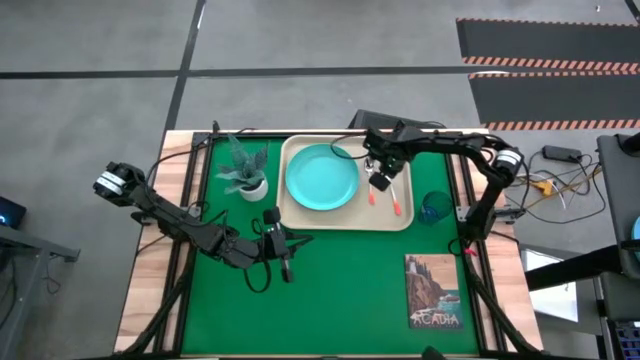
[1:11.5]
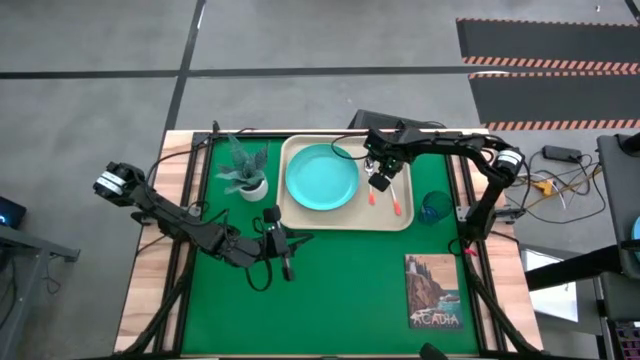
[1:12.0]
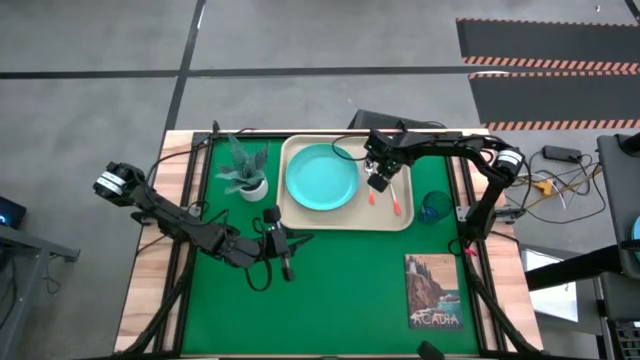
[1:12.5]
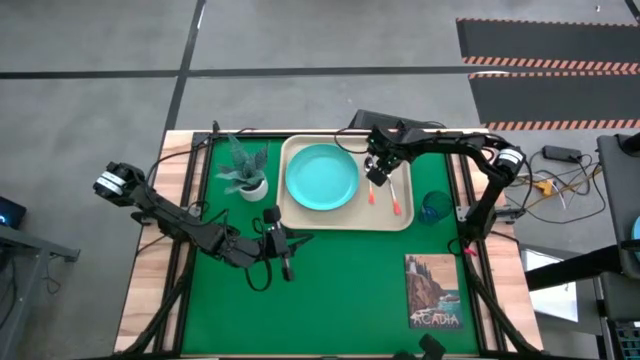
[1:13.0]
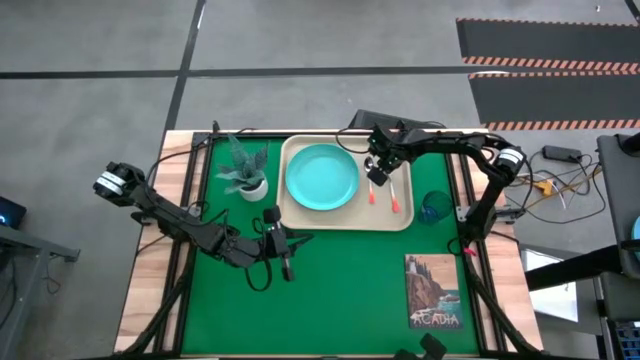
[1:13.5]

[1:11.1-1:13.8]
Task: Pick and place plate/cup/fork/spoon on tray
Adjust the orange fork on the light white tray

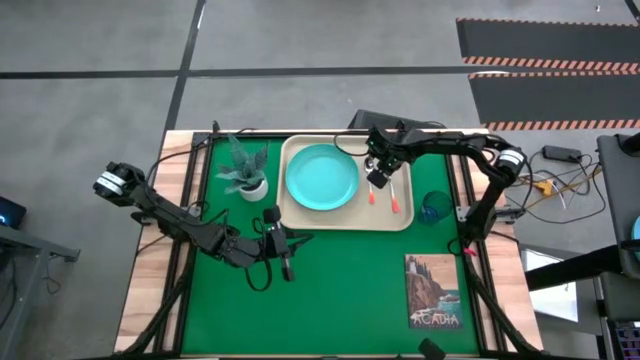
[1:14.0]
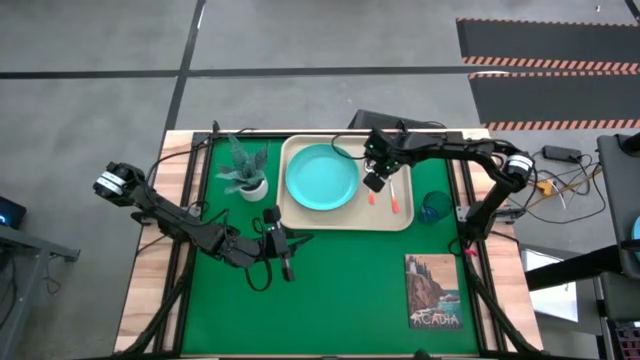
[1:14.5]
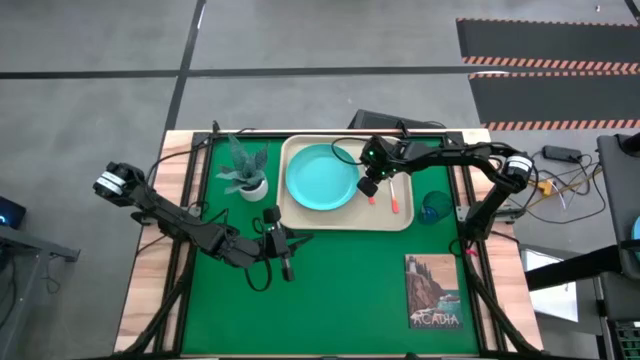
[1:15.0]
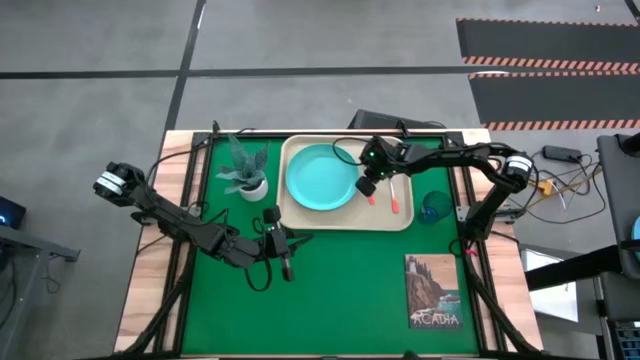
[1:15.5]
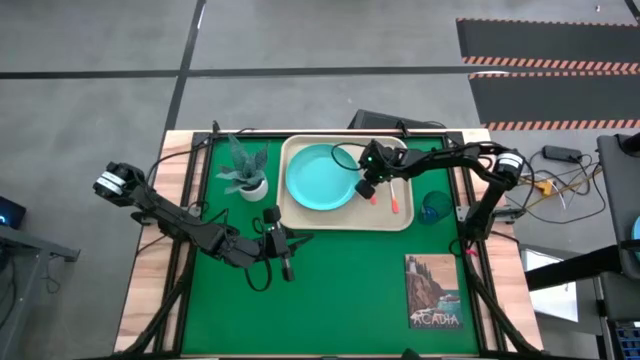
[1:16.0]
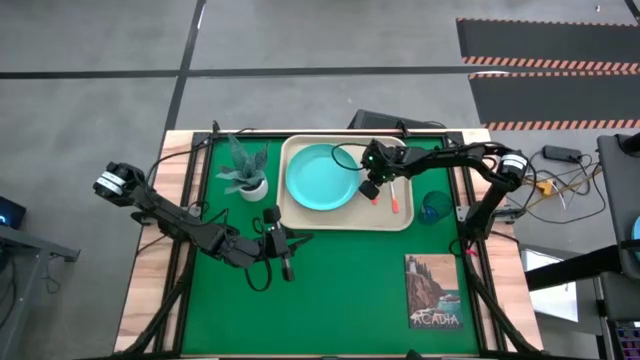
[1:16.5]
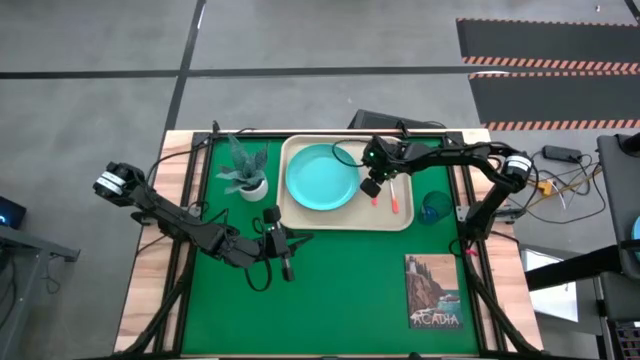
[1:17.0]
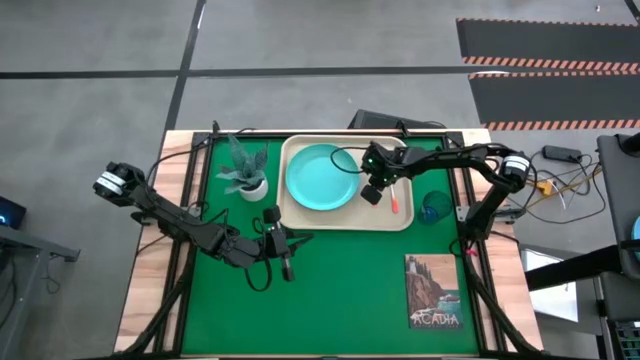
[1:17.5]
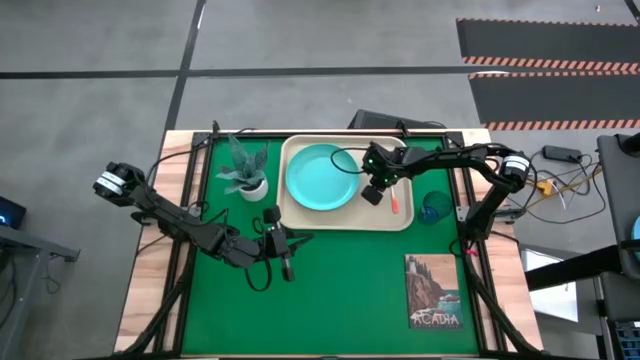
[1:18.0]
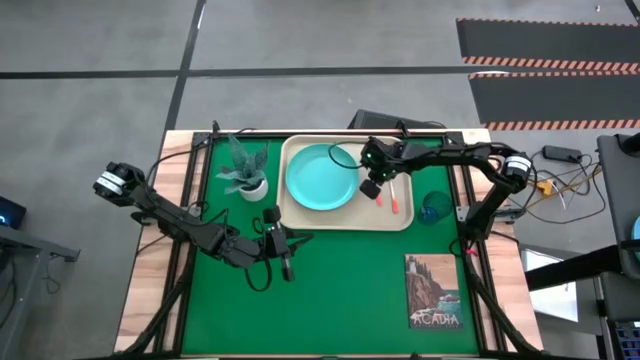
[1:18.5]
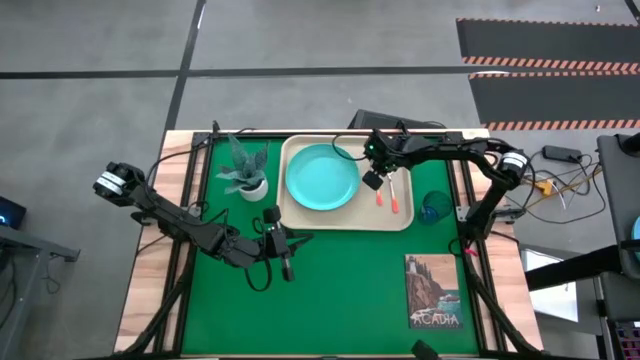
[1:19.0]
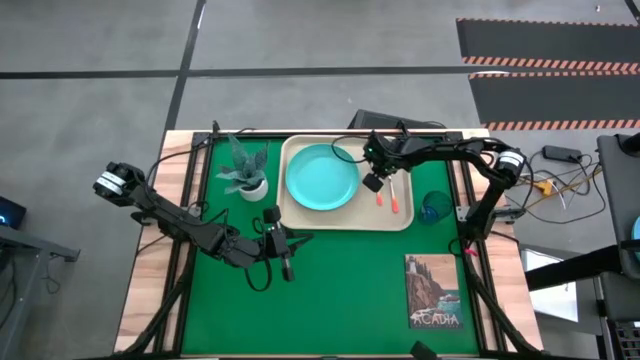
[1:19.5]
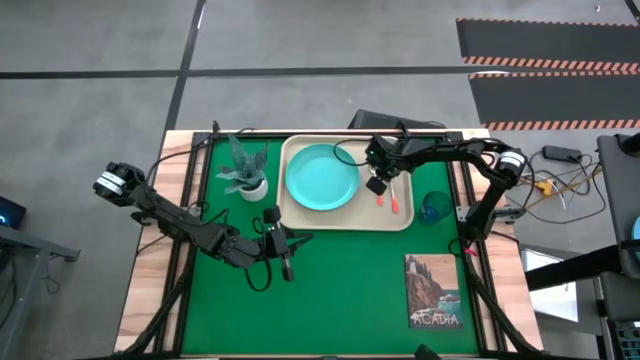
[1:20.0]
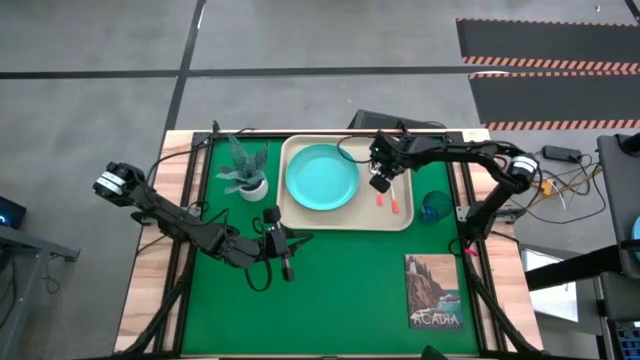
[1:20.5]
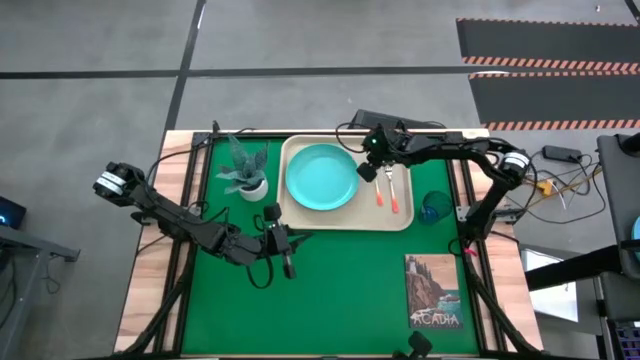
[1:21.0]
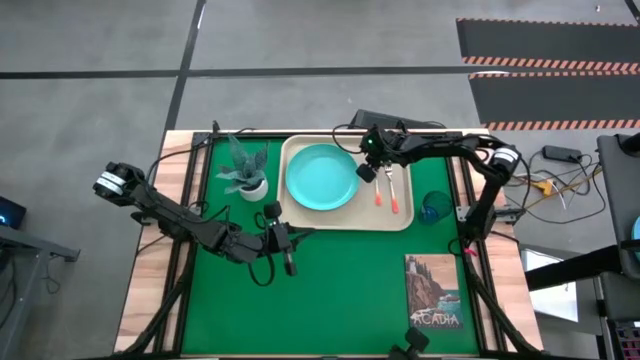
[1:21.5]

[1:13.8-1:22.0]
Adjust the orange spoon on the light white tray

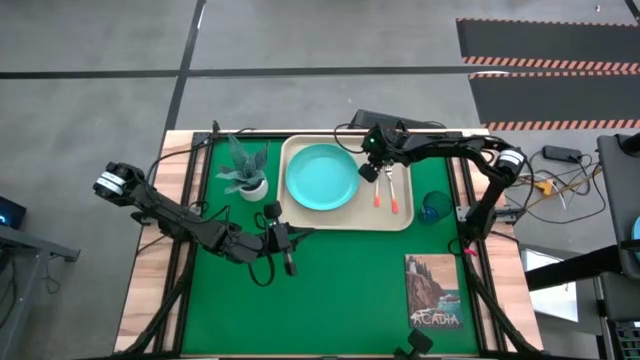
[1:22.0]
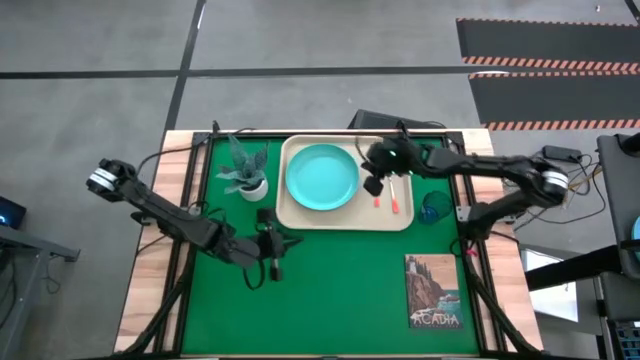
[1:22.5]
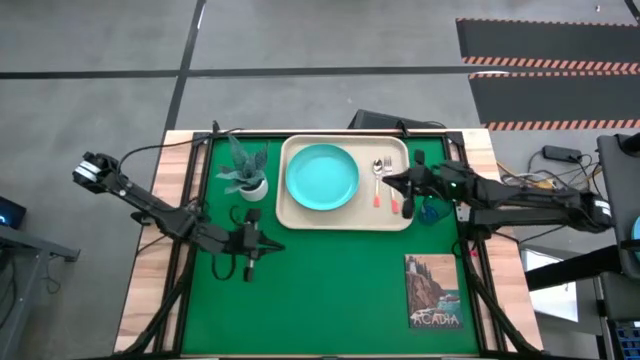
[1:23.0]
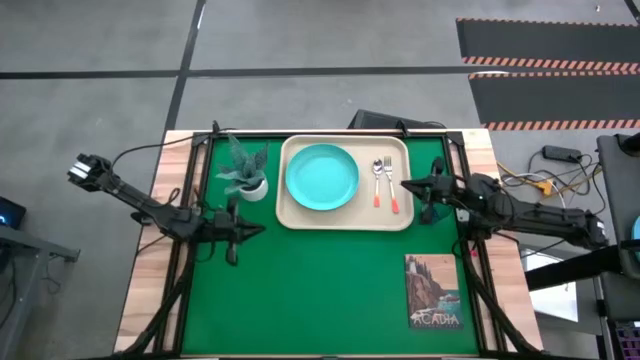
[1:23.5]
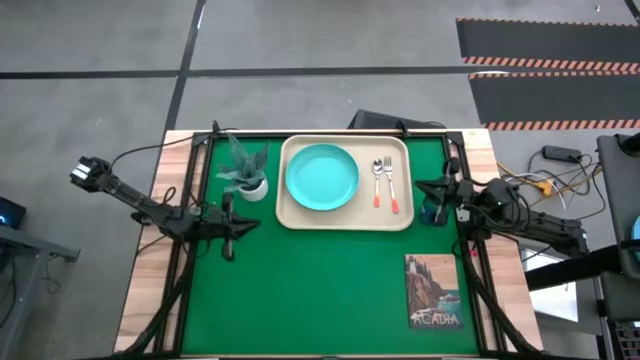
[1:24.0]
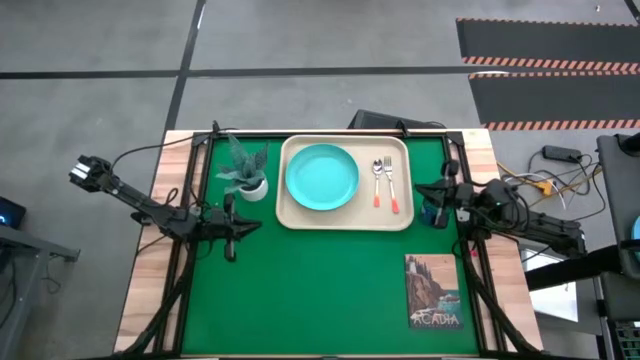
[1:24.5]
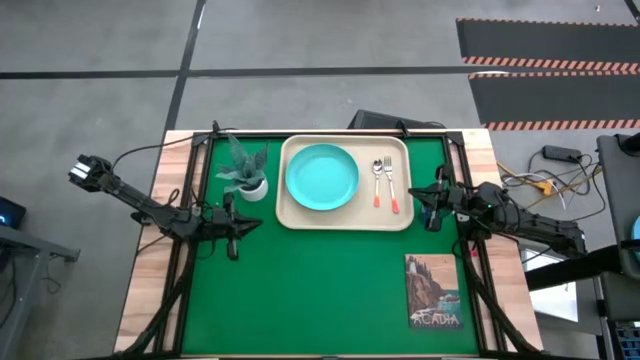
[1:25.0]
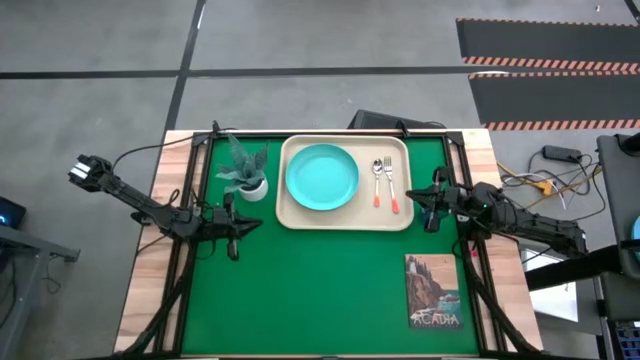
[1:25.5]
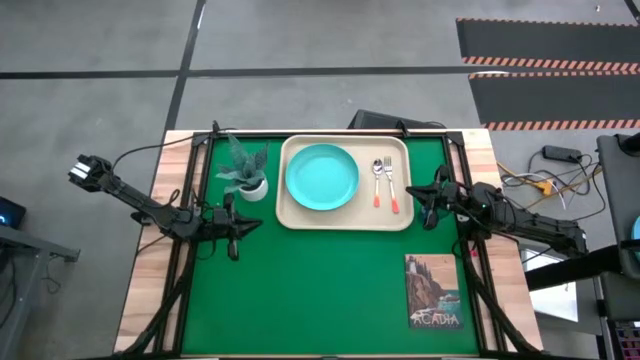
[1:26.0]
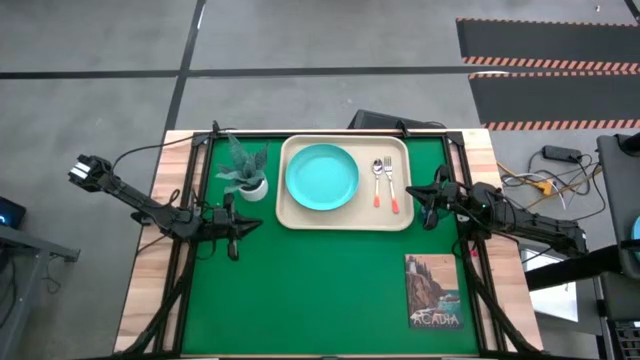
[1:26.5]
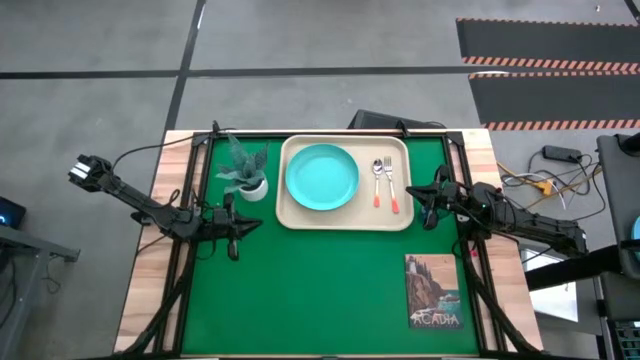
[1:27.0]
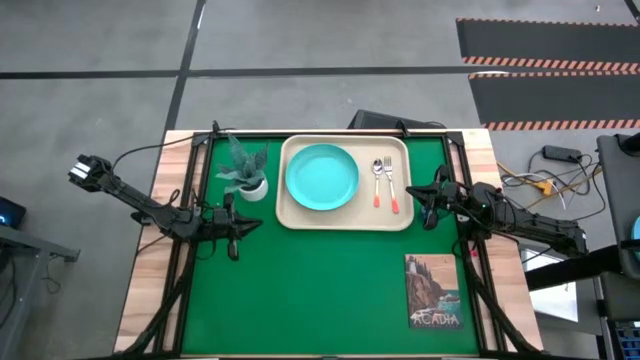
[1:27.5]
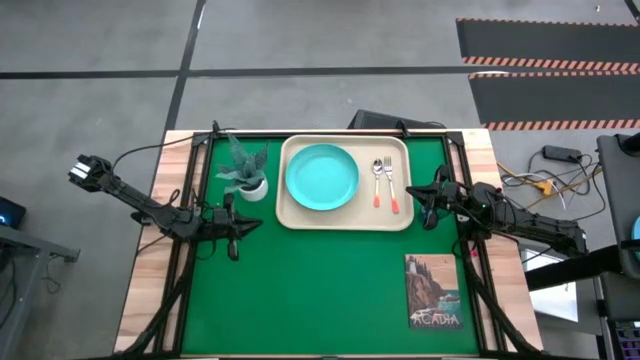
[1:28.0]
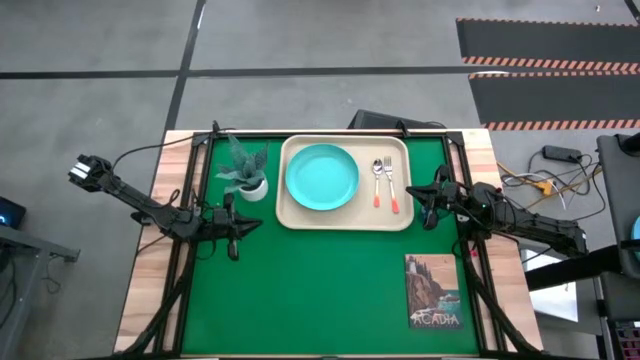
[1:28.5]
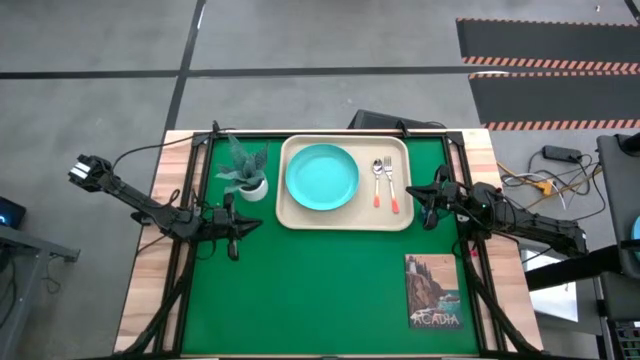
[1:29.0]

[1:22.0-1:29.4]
Return to Home Position

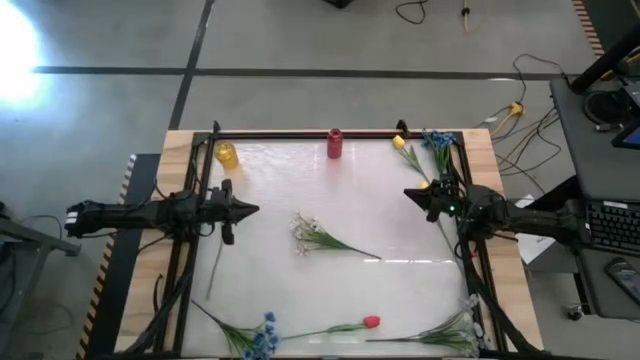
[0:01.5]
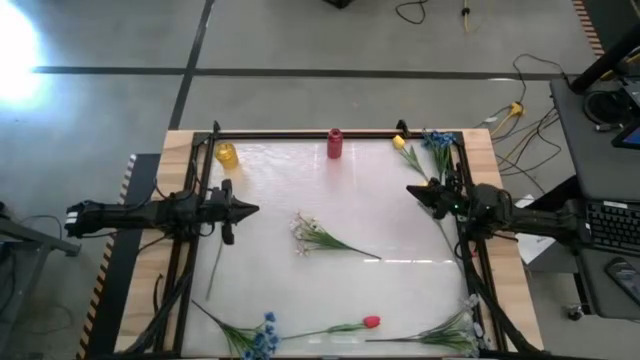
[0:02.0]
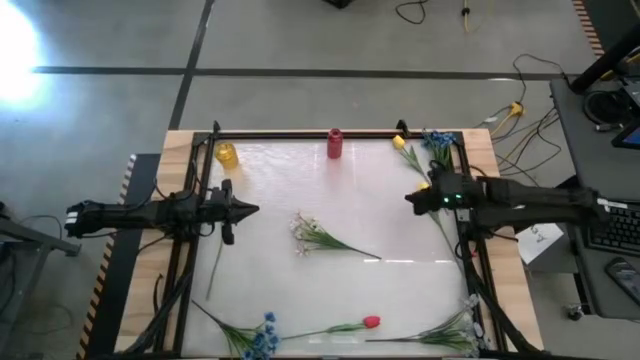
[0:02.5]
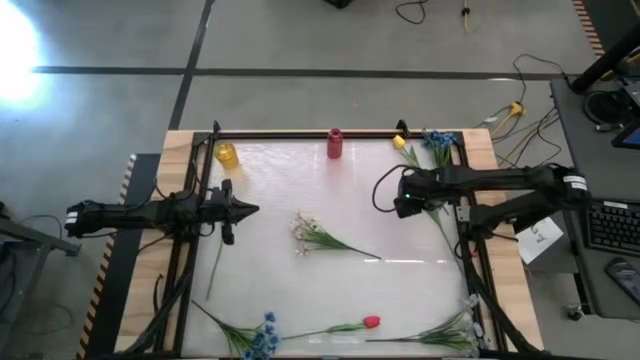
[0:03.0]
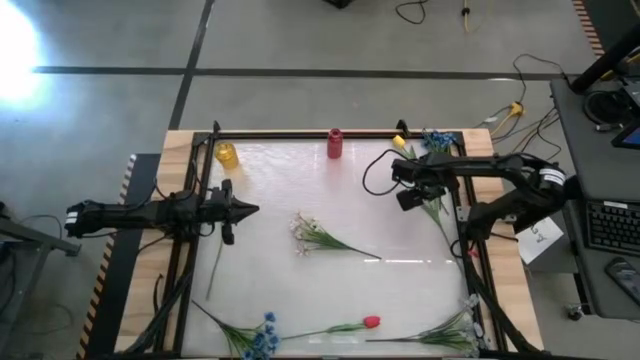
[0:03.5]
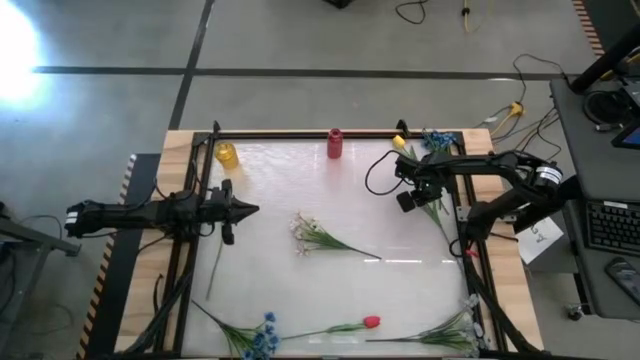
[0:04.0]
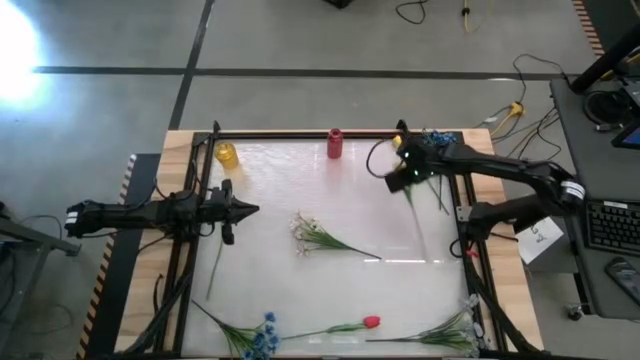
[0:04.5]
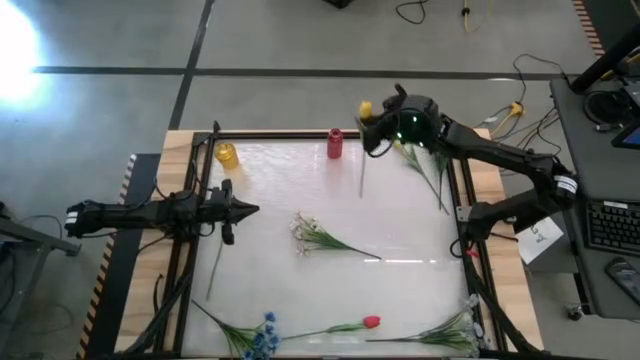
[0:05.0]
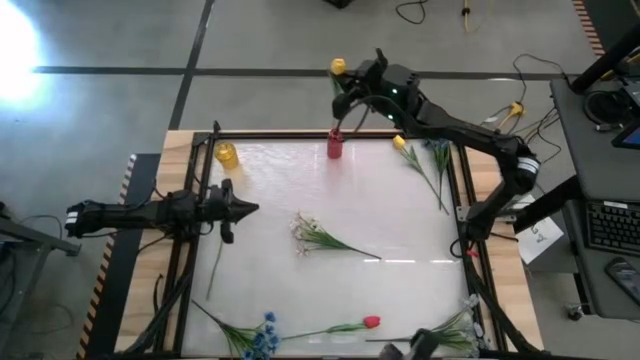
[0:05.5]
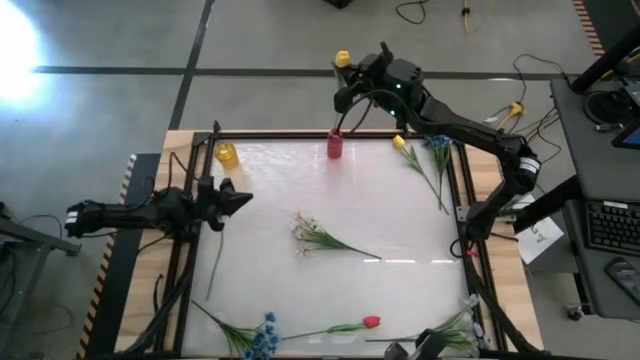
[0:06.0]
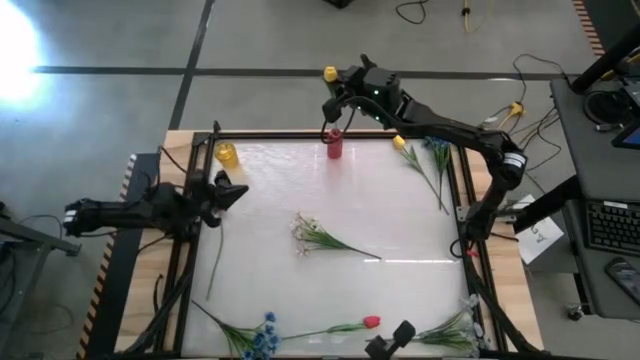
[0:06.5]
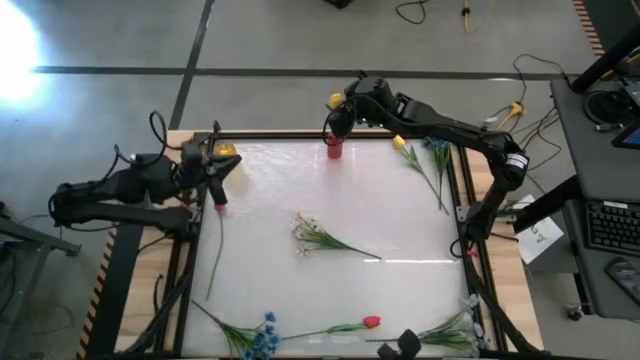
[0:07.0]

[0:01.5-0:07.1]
Task: Sort flowers into vase by color
Put the bottom yellow flower into the red vase
